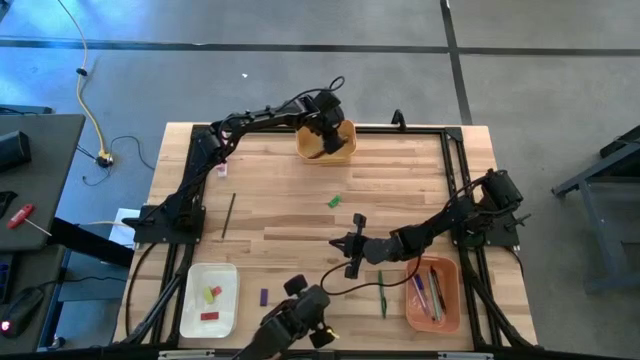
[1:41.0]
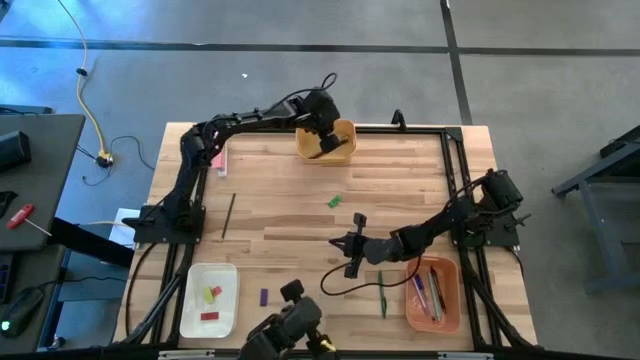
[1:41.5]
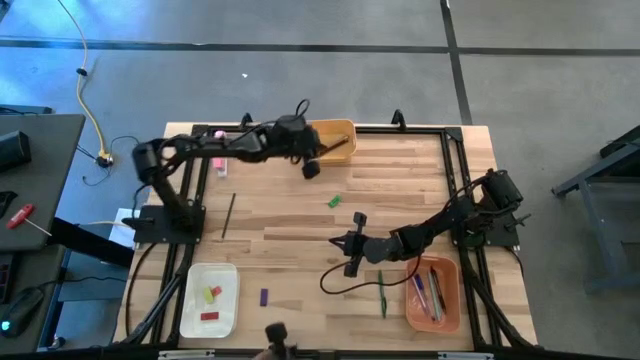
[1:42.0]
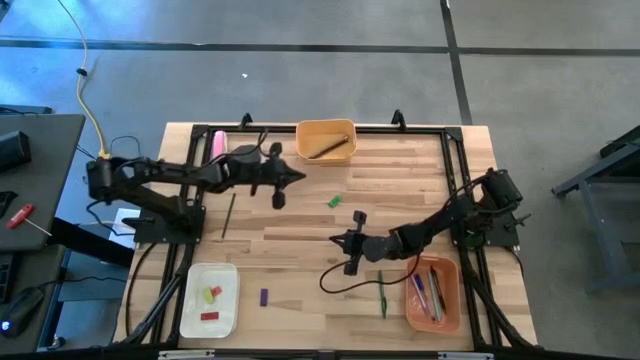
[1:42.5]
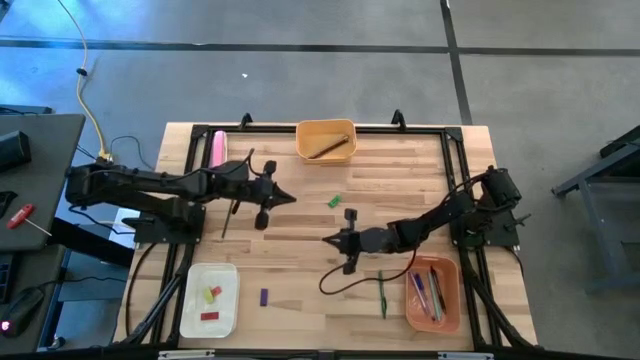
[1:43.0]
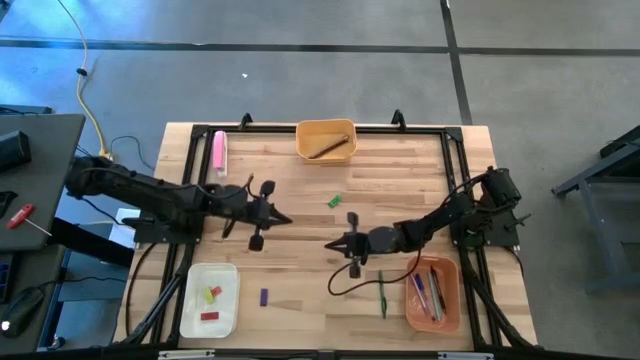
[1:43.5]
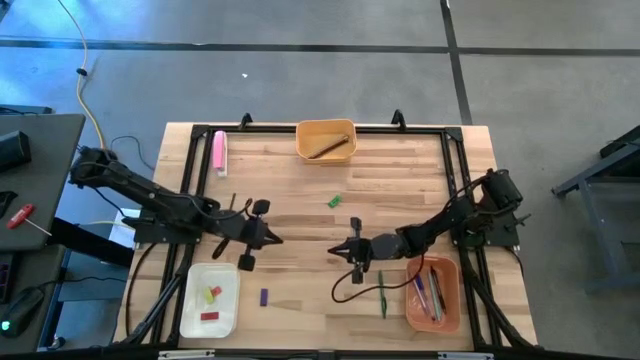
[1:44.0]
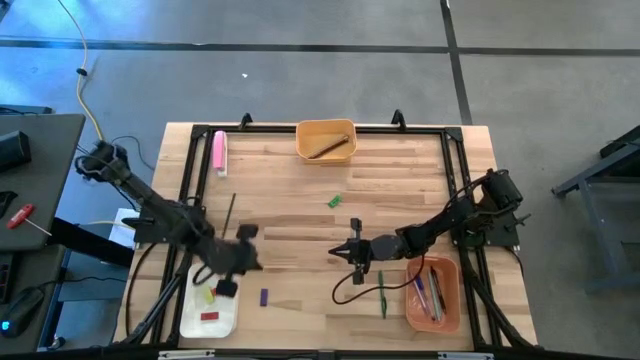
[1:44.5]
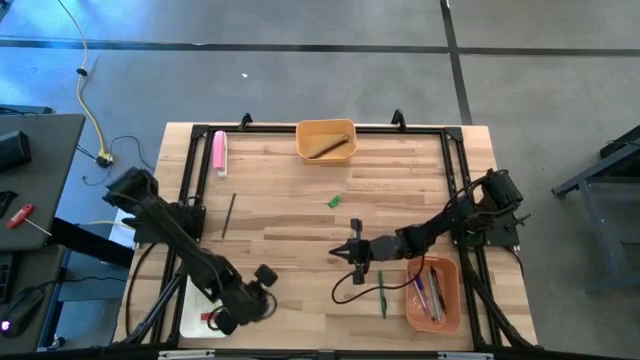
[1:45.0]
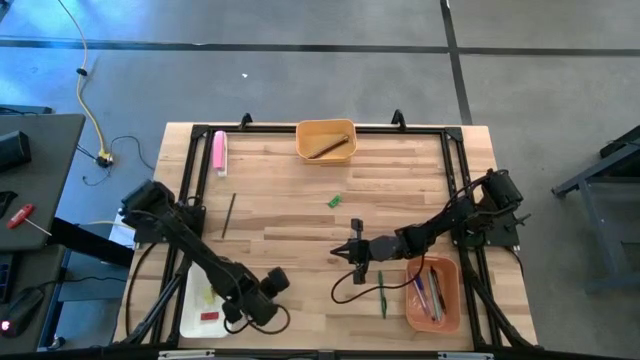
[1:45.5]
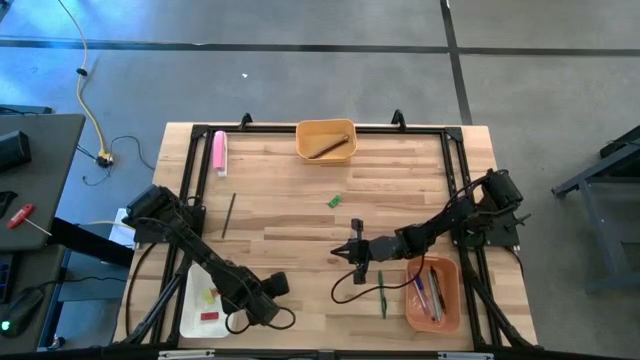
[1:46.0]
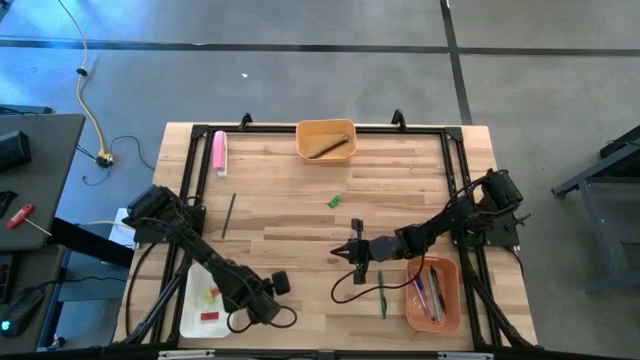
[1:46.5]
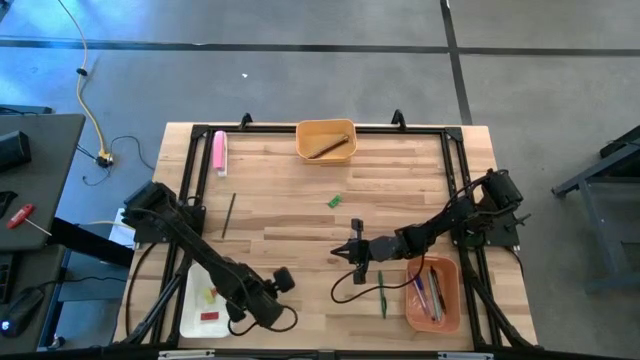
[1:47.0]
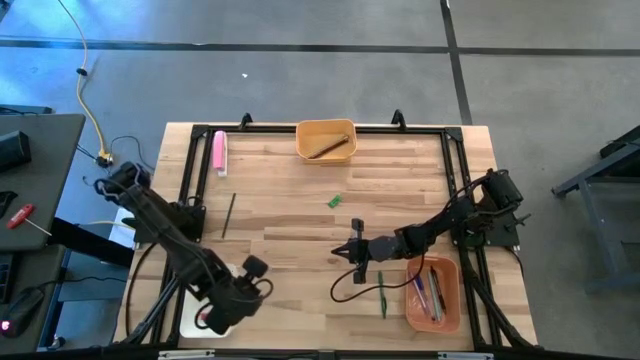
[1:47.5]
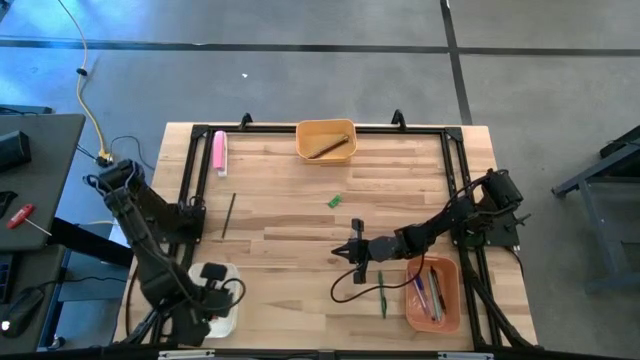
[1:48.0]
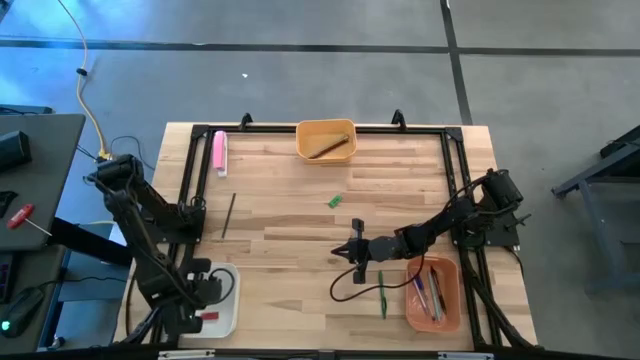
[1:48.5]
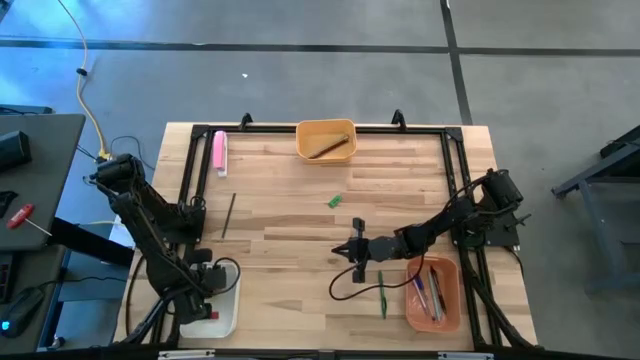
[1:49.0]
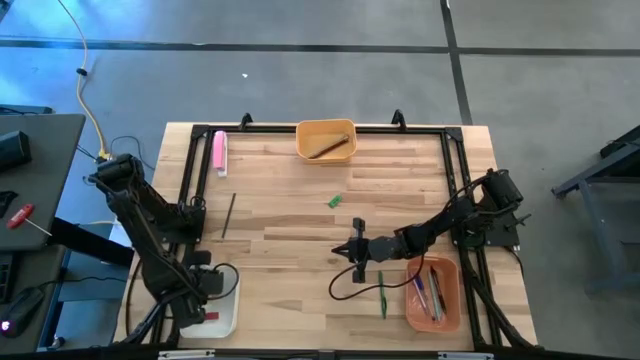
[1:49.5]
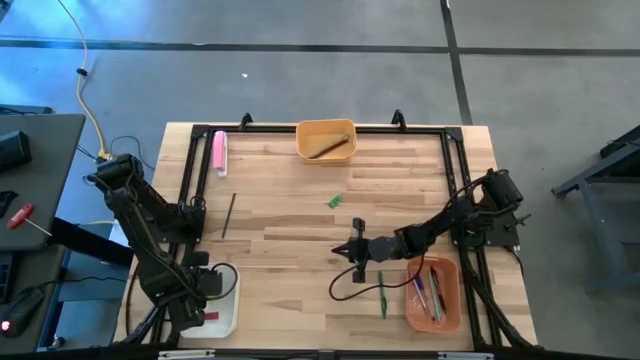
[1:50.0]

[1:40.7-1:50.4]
Task: Sort crayons/erasers/pens/pencils in bins
Put the blue eraser into the white bin

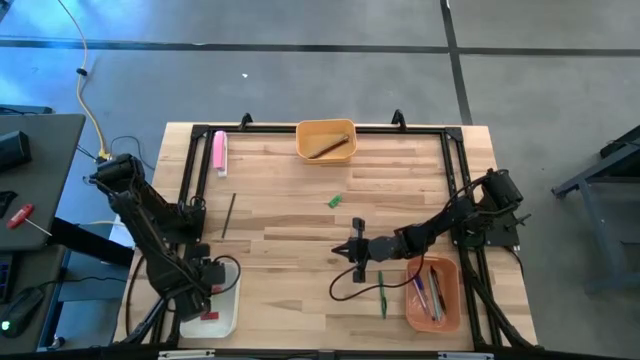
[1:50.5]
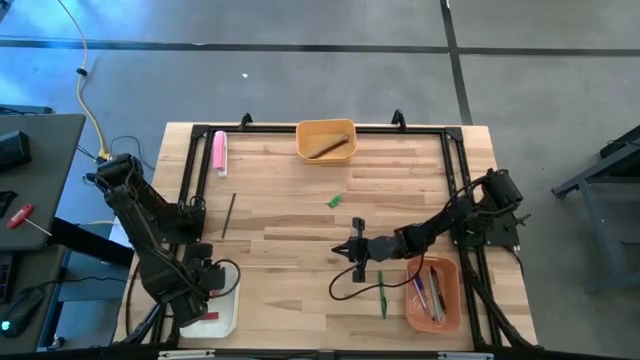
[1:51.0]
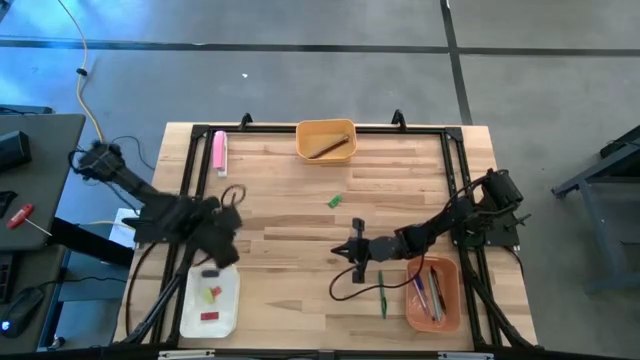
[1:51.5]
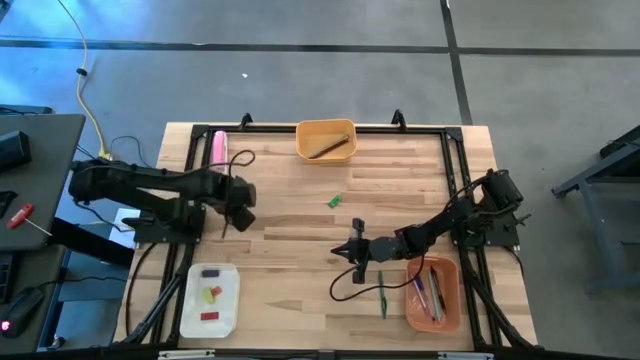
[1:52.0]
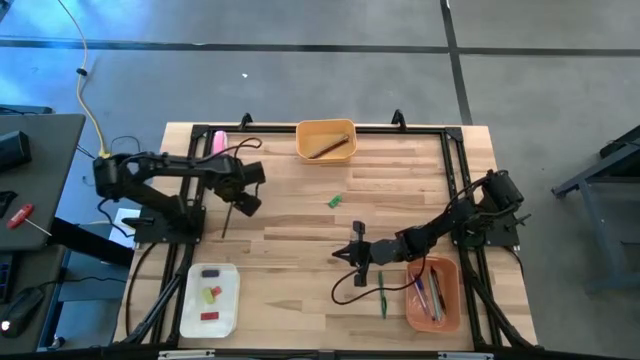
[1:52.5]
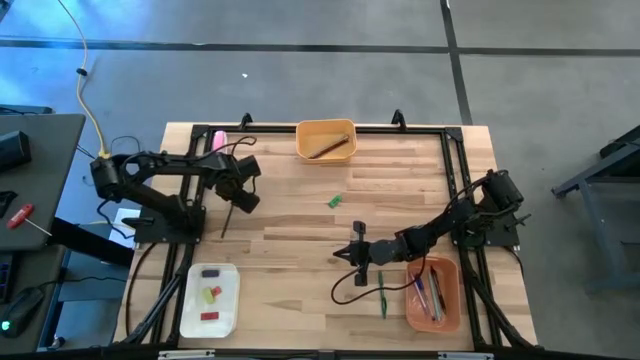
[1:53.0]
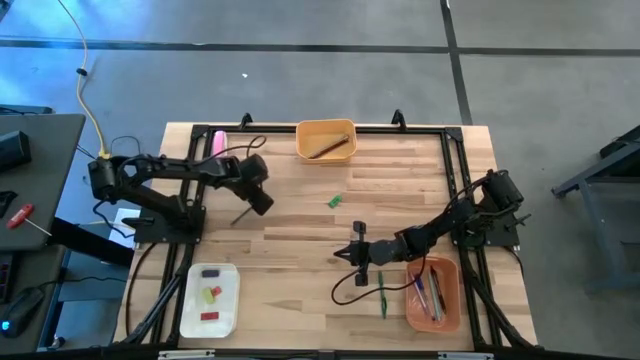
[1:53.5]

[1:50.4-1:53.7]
Put the dark green pencil into the yellow bin

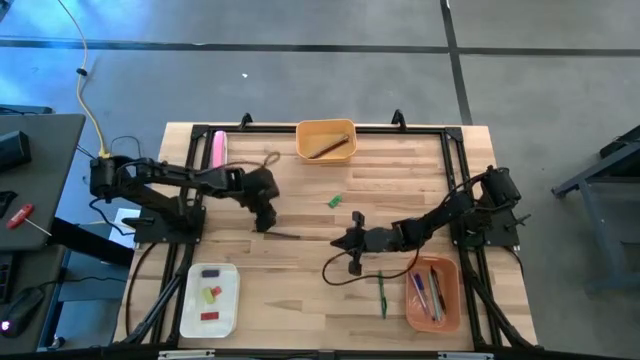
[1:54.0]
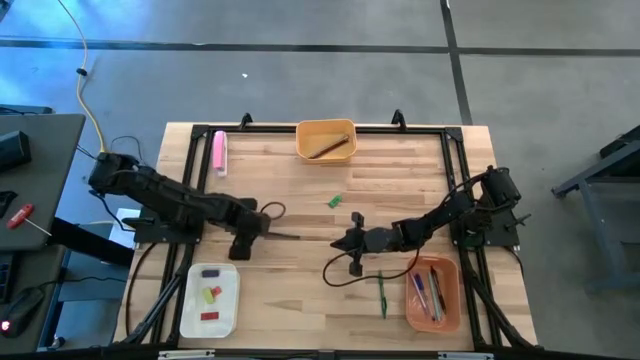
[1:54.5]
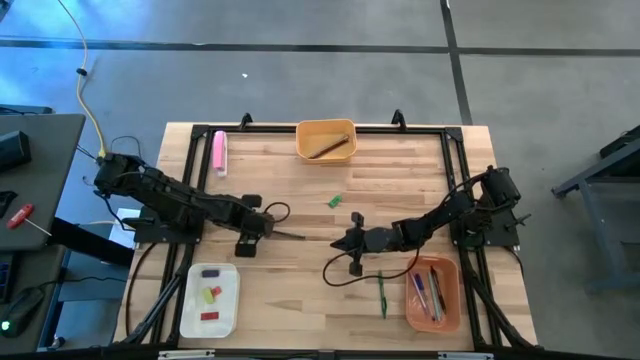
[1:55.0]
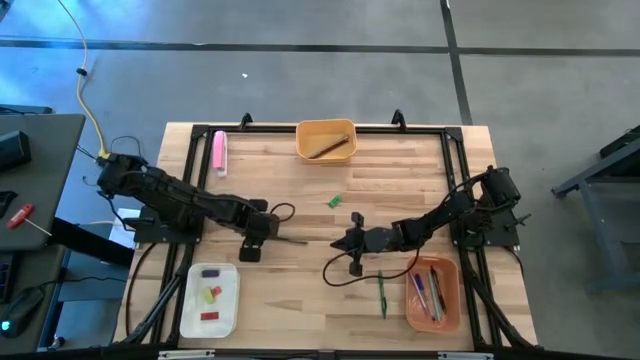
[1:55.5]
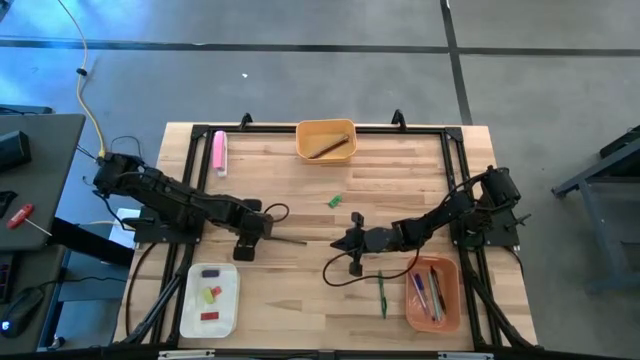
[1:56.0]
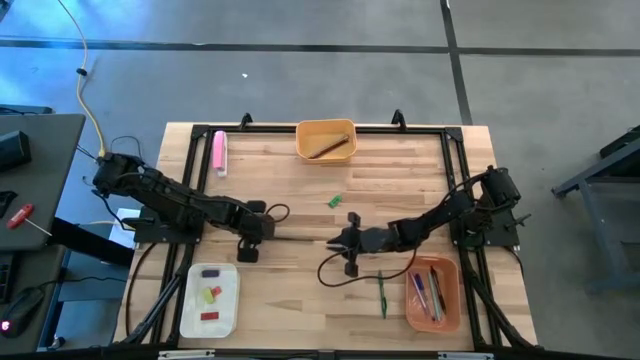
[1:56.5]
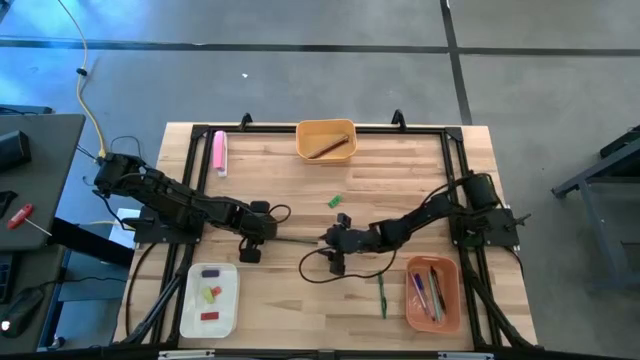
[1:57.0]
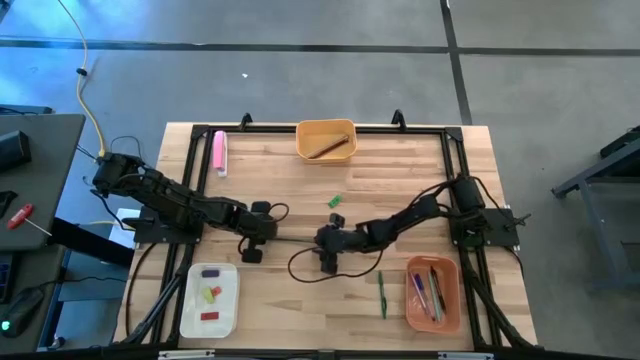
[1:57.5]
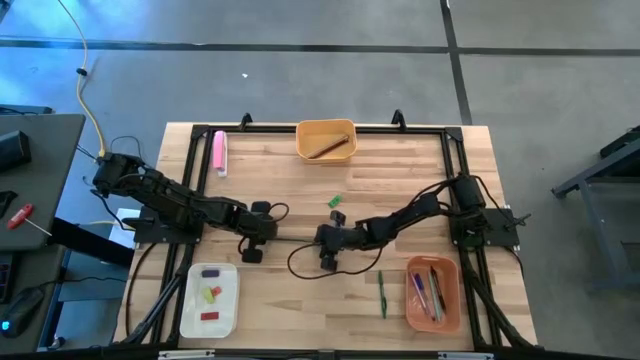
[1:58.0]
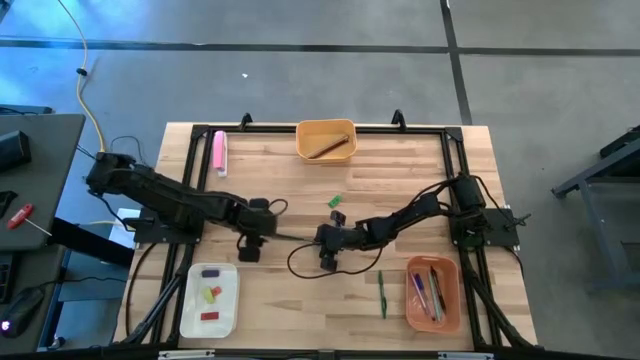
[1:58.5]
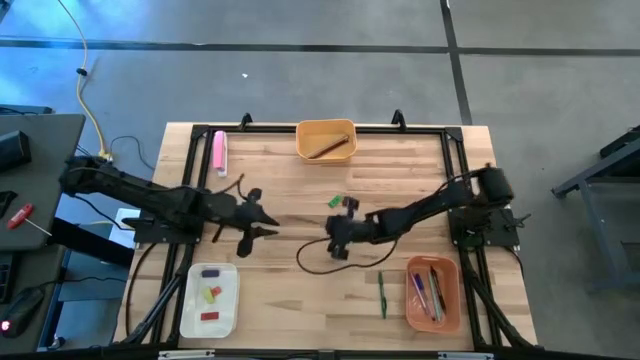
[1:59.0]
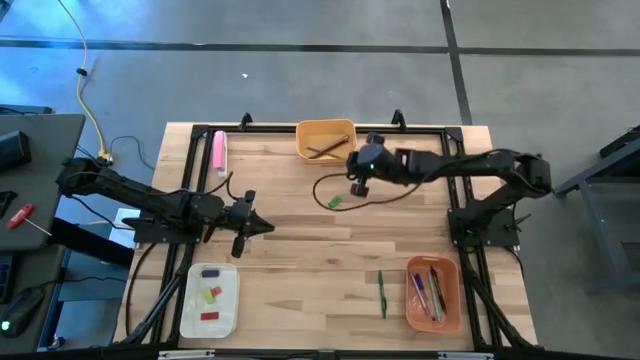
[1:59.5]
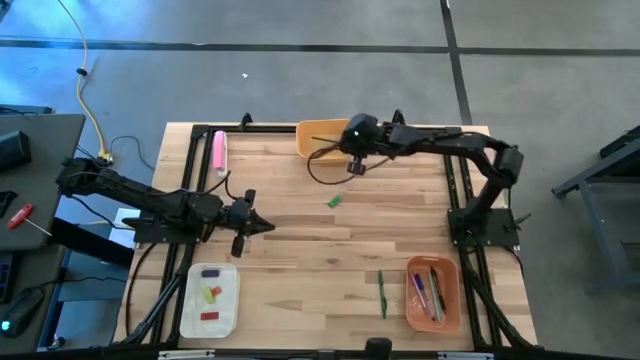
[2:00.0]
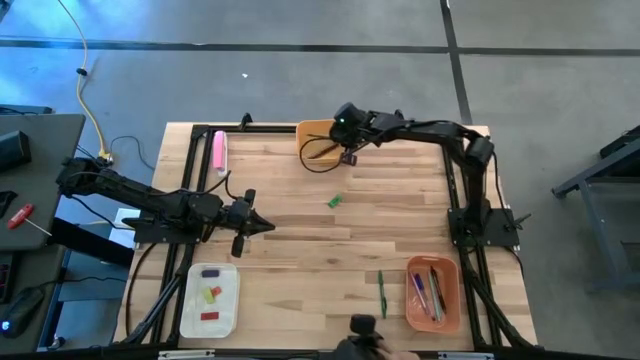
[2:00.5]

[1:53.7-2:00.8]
Put the dark green pencil into the yellow bin

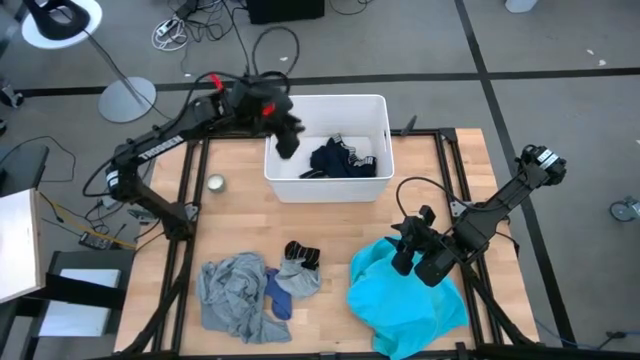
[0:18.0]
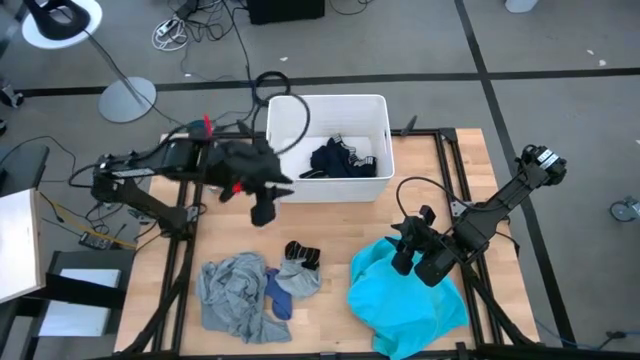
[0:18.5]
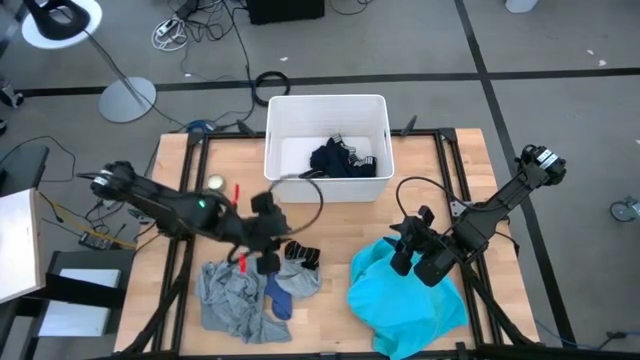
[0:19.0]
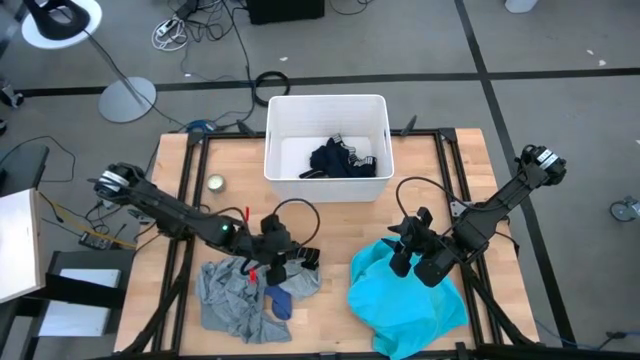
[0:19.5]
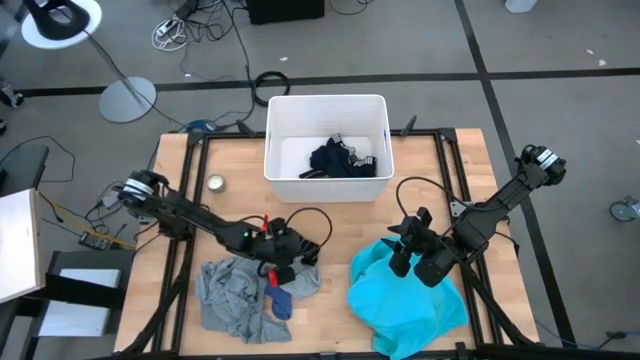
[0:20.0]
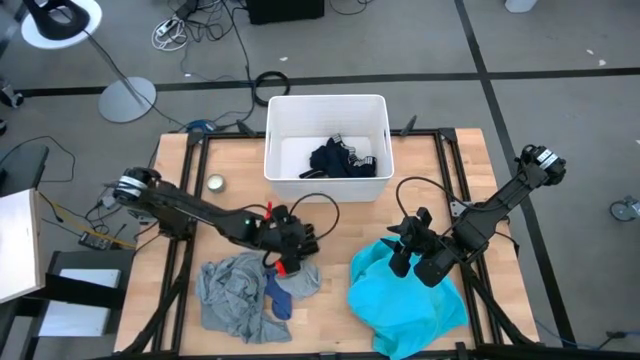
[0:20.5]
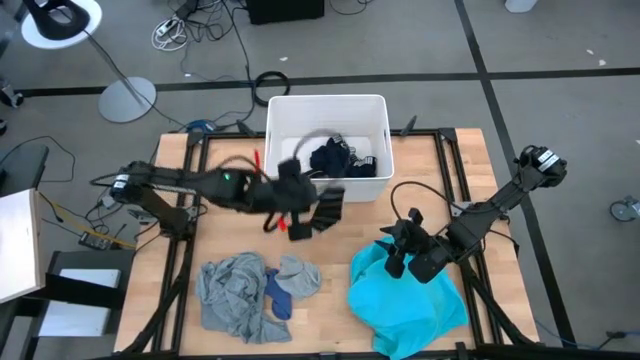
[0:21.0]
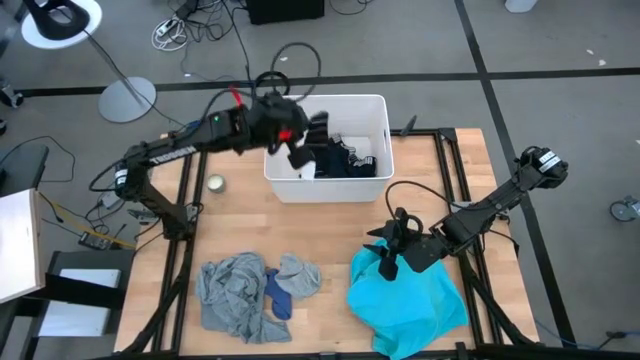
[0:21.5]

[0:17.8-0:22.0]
Task: Sort clothes
Put the black sock into the white laundry bin
